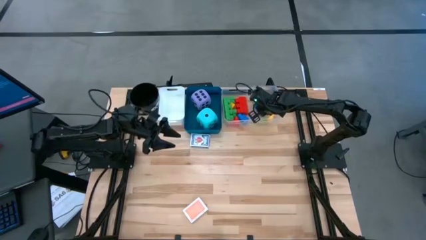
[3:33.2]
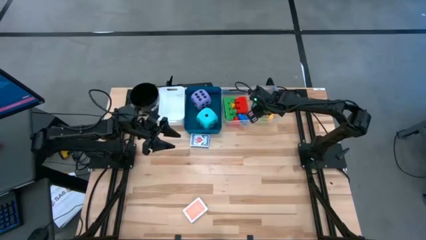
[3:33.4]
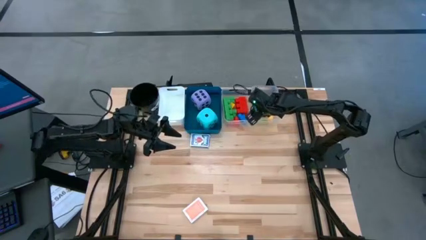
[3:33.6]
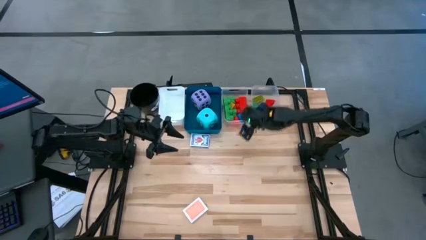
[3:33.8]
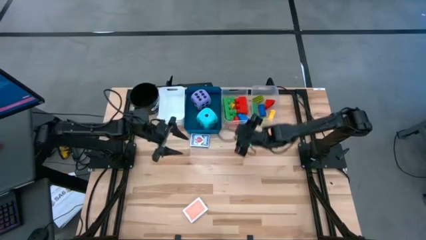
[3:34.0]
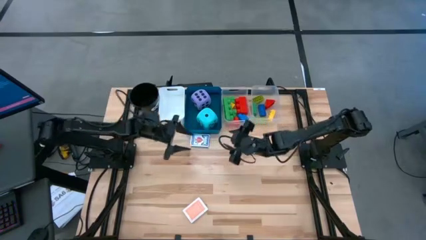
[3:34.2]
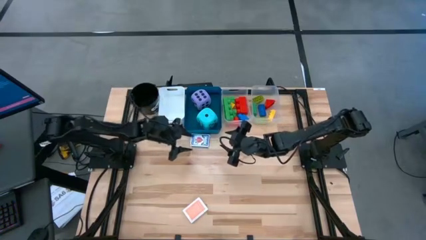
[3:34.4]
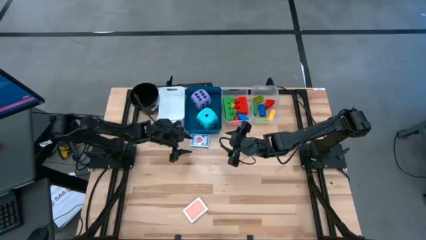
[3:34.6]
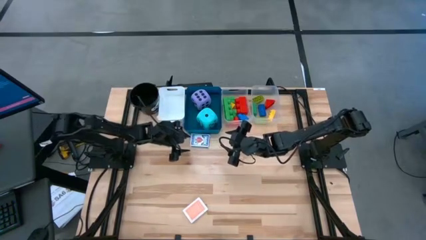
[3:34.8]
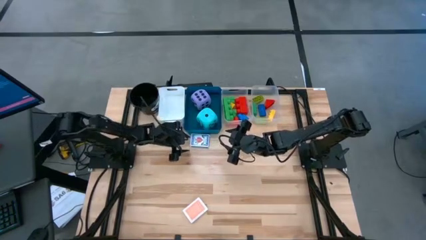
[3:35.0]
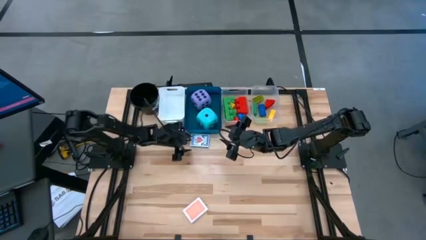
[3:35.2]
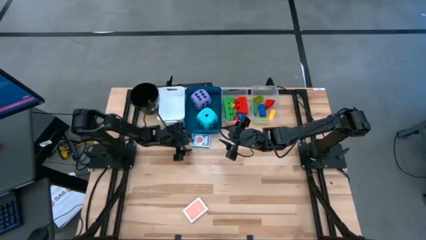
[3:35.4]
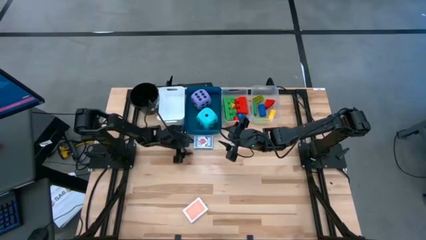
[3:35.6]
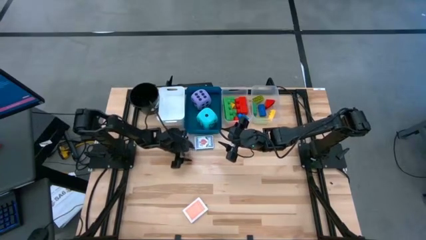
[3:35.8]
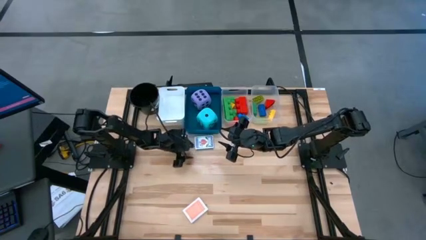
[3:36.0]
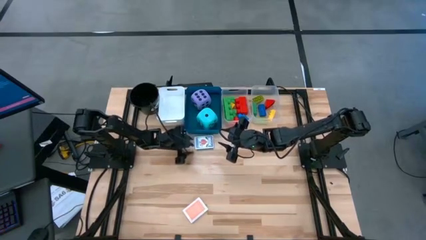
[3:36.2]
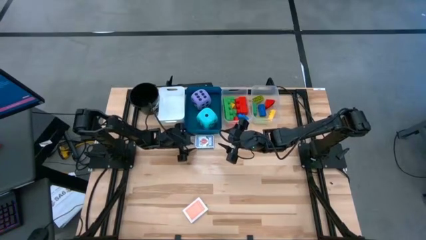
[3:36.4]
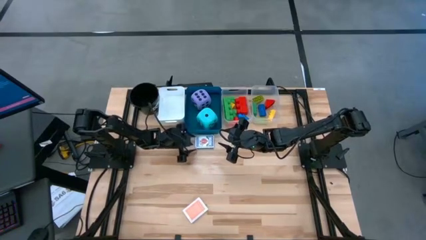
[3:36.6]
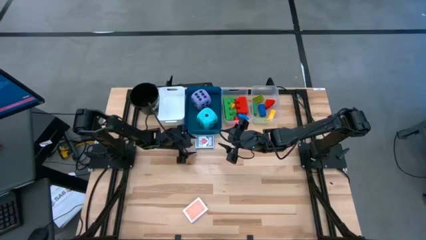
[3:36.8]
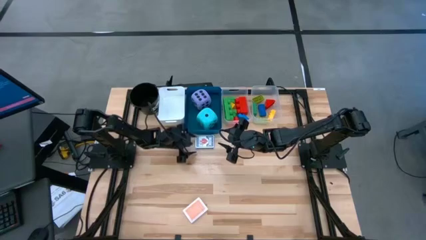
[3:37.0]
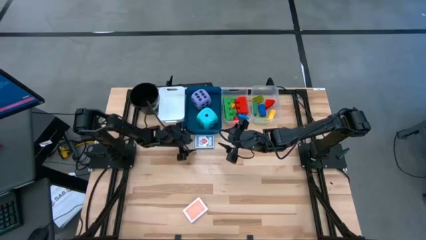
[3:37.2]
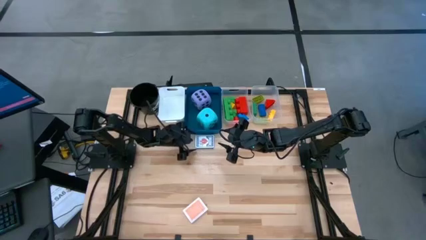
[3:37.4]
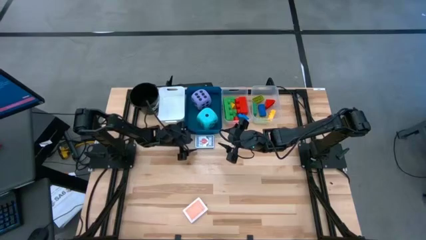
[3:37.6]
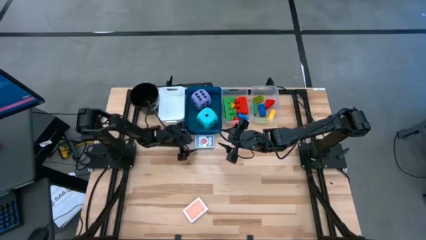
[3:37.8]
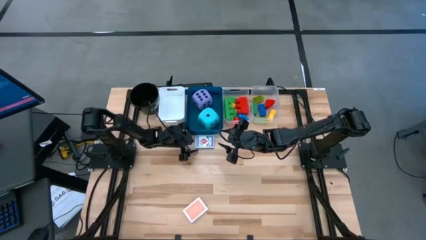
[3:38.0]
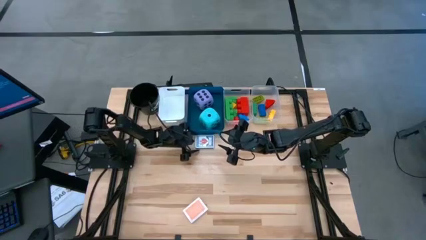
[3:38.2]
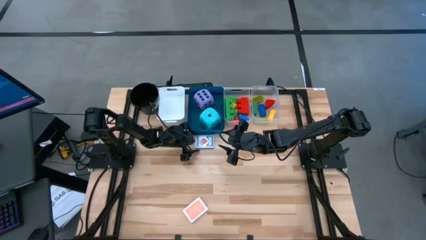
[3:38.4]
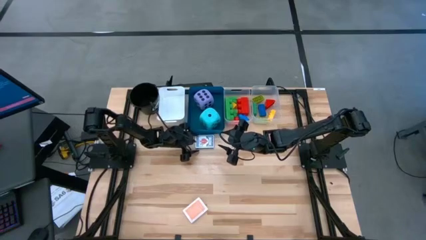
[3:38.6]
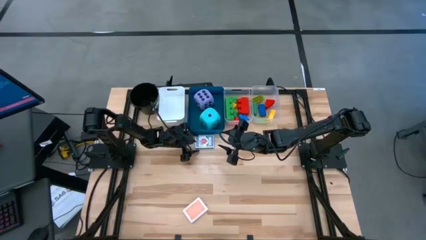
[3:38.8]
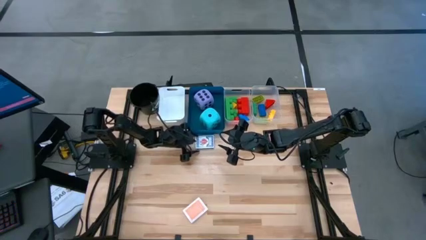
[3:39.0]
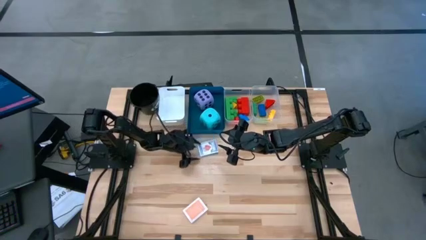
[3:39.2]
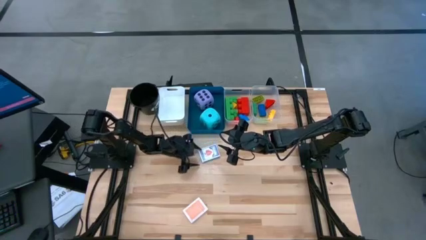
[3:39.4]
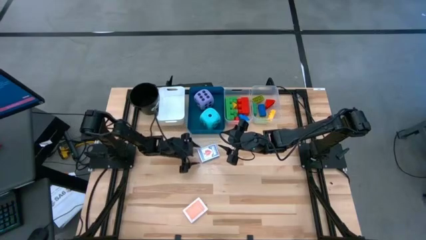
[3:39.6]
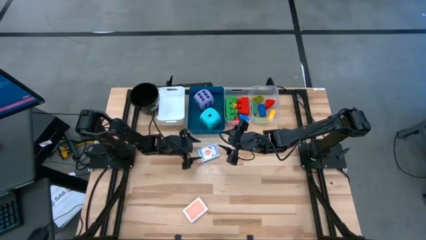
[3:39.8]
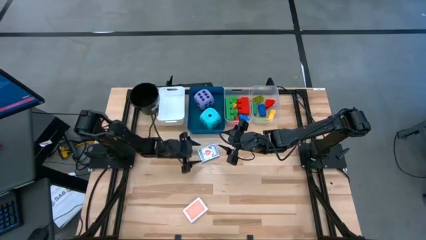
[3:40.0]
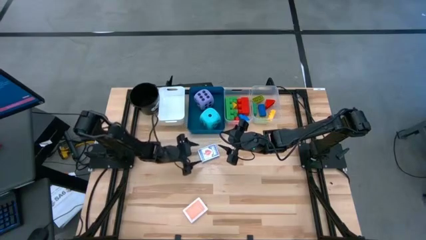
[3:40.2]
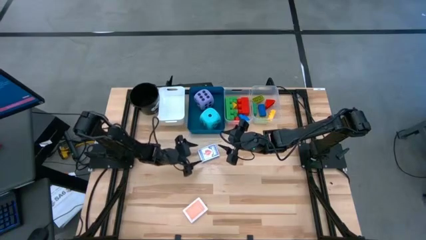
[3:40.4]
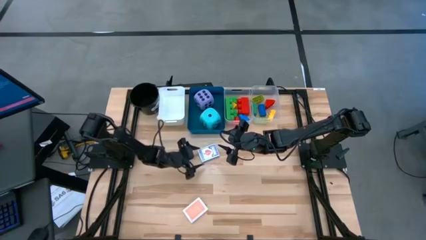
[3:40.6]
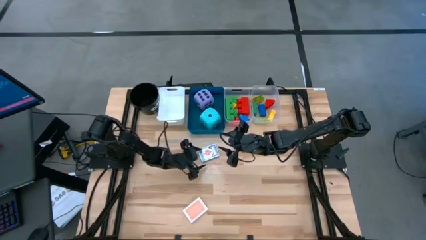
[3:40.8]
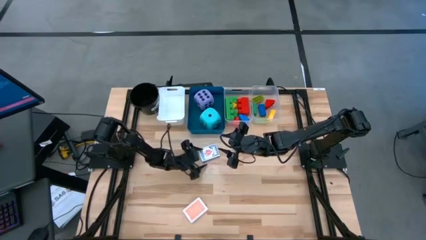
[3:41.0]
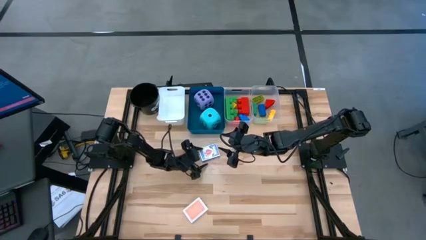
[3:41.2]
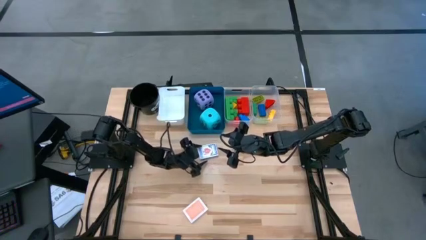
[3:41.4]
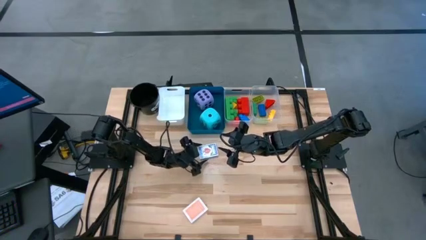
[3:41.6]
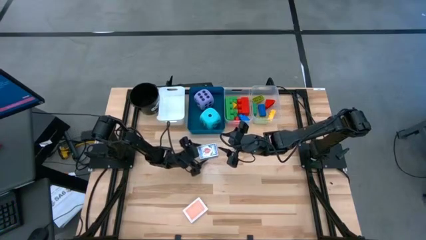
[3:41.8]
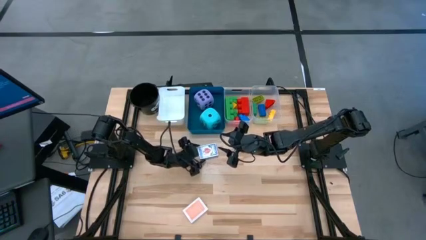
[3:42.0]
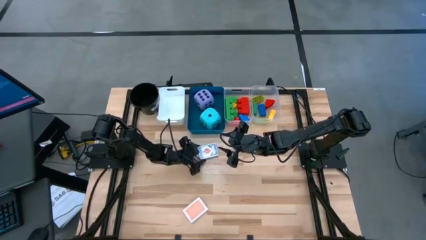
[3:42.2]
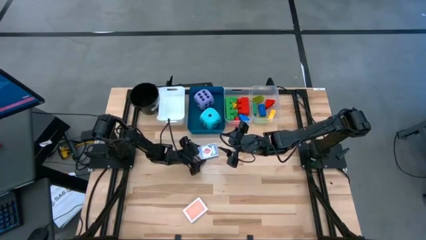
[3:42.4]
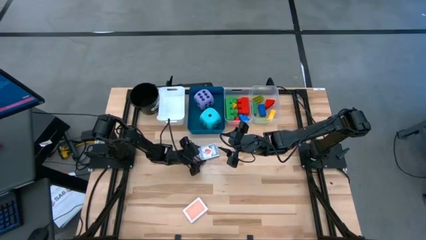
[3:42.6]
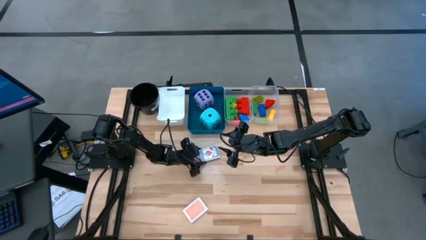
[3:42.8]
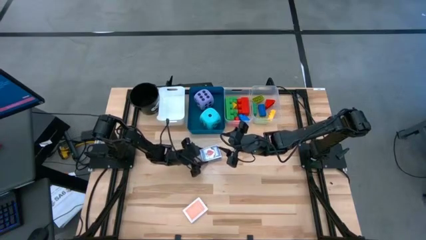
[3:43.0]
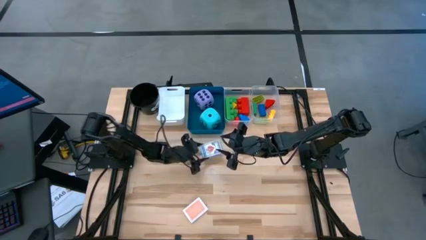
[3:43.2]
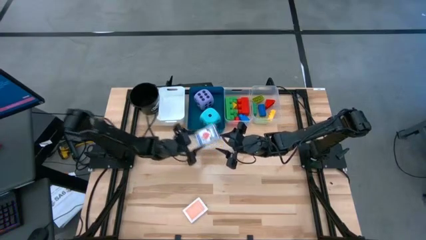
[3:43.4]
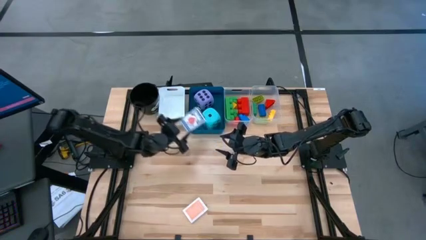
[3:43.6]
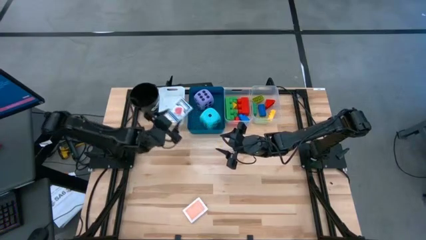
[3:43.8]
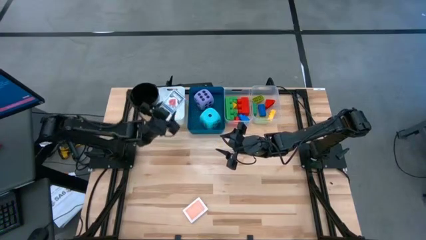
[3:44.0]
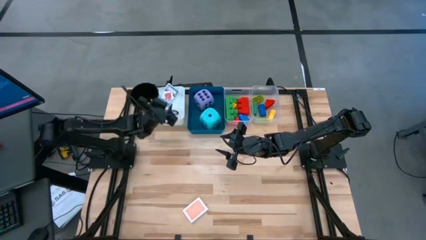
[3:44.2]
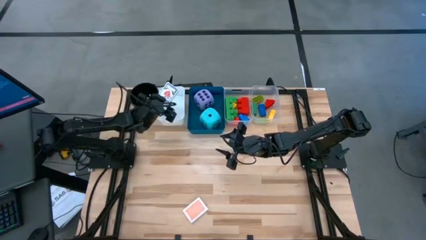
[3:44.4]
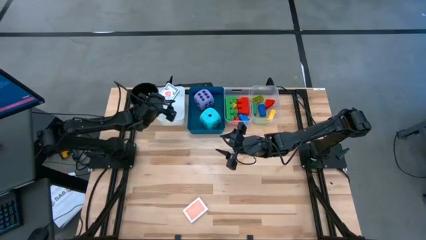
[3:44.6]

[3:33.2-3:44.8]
Task: Pick & Place Toys
Put the blue playing card into the white bin
